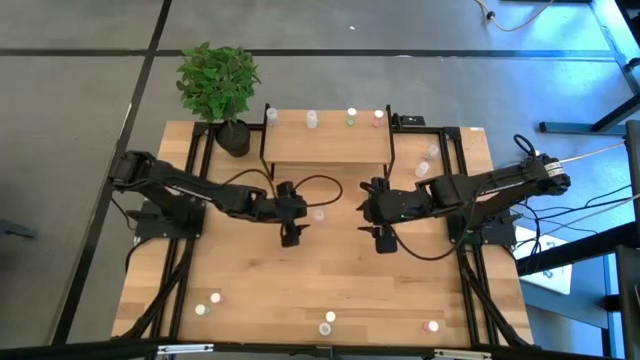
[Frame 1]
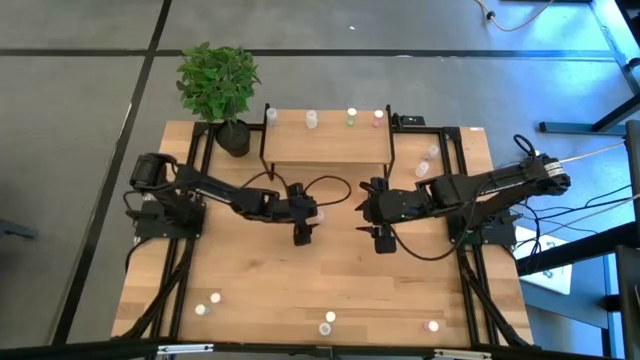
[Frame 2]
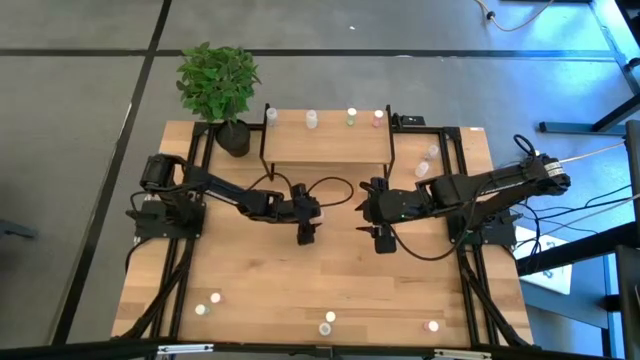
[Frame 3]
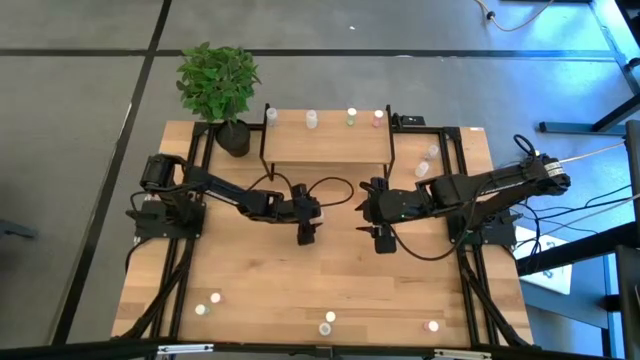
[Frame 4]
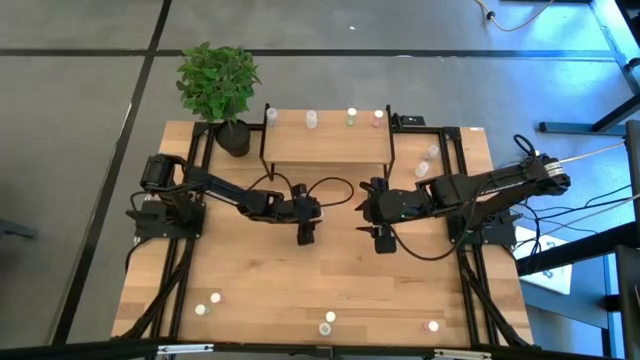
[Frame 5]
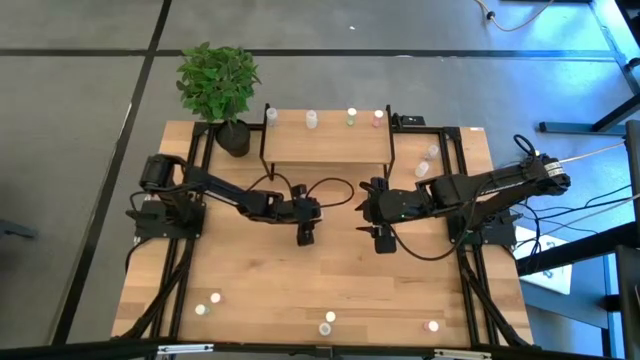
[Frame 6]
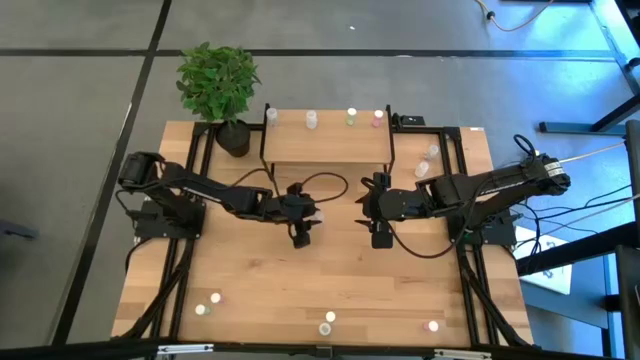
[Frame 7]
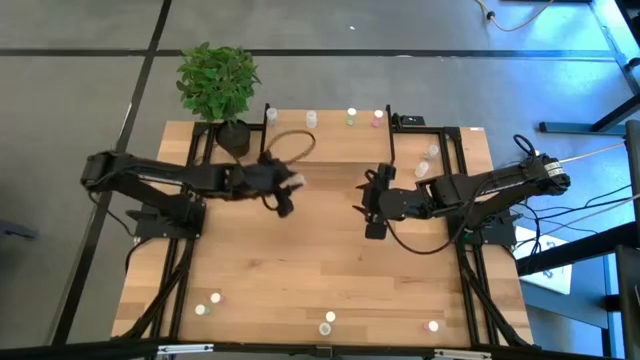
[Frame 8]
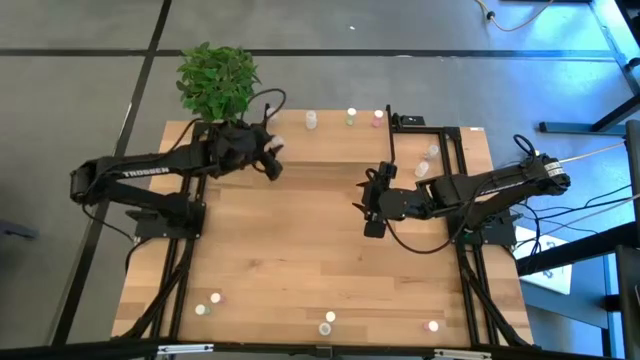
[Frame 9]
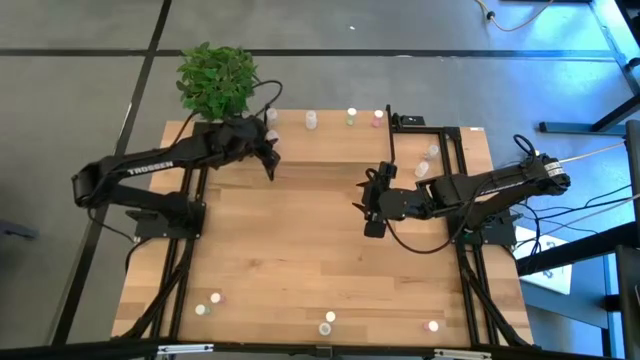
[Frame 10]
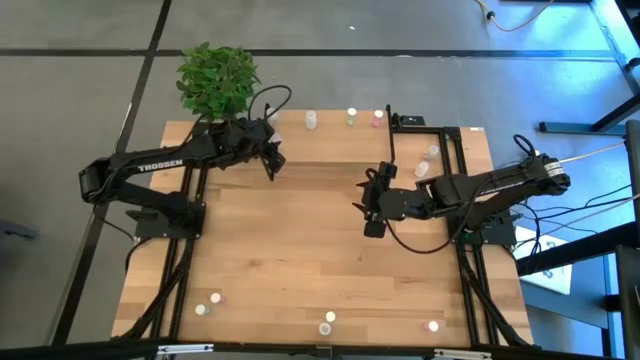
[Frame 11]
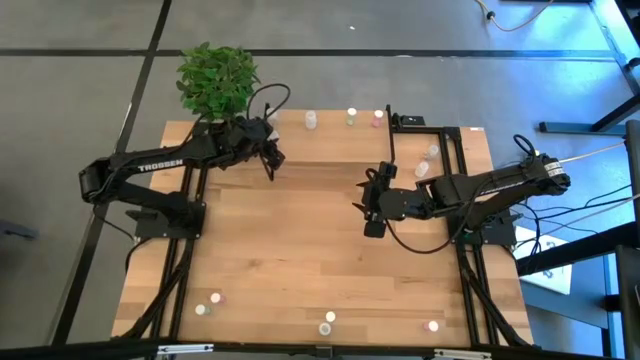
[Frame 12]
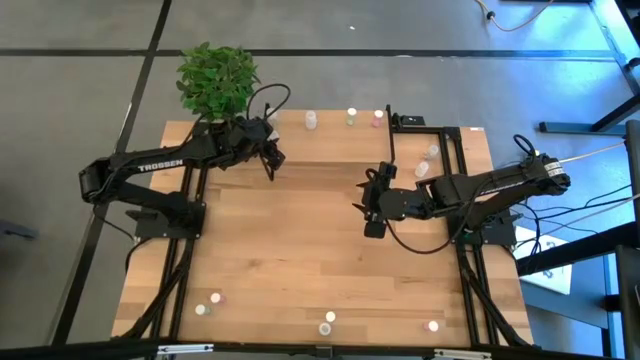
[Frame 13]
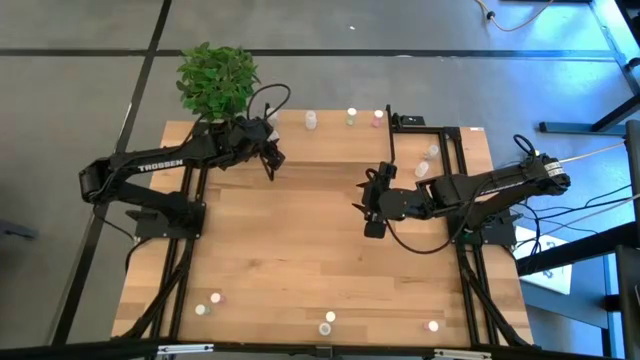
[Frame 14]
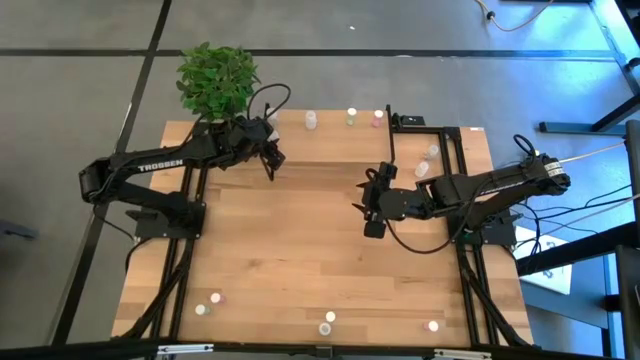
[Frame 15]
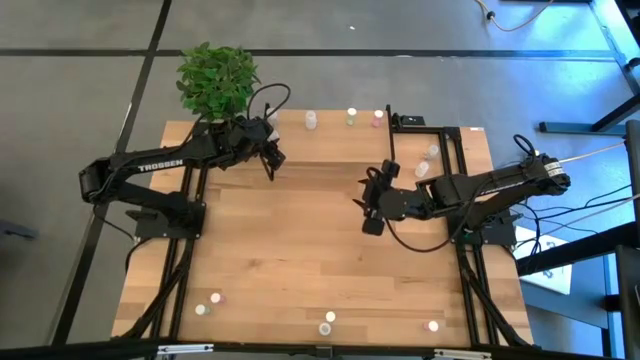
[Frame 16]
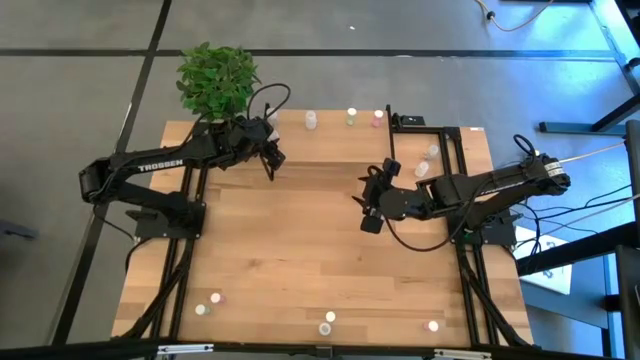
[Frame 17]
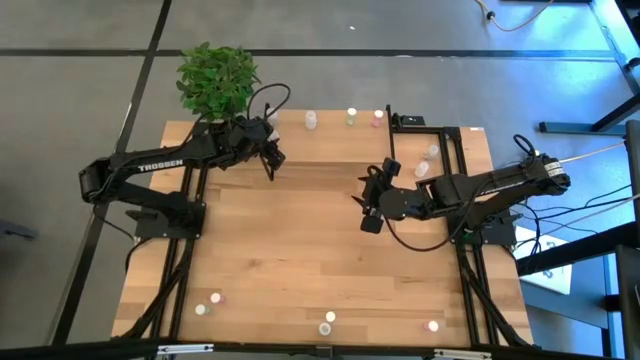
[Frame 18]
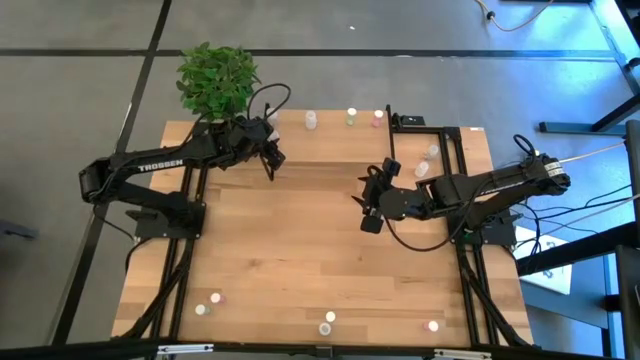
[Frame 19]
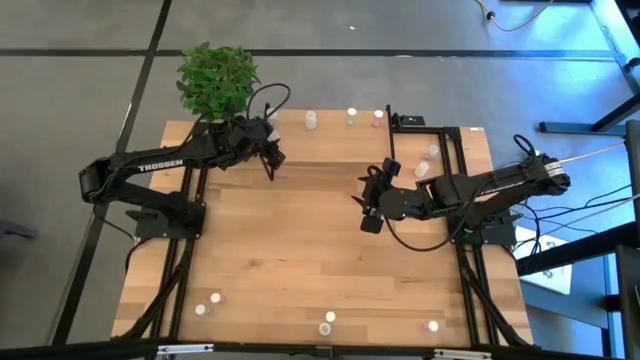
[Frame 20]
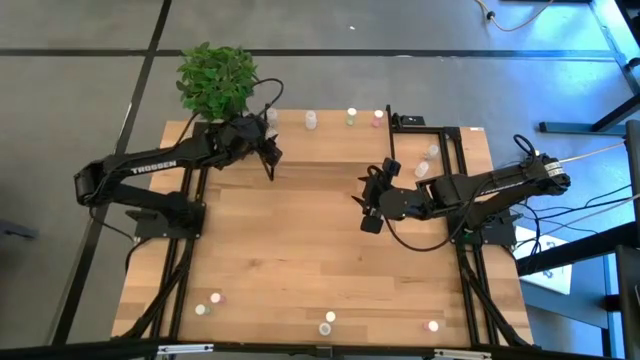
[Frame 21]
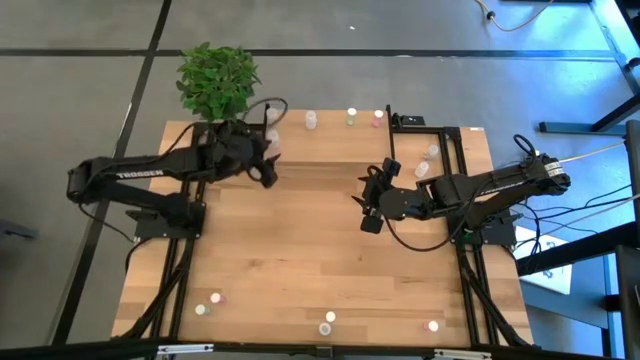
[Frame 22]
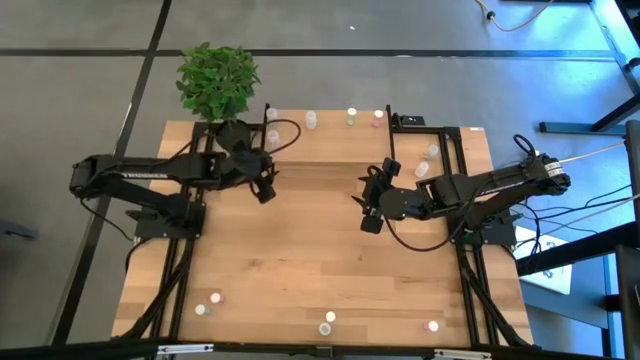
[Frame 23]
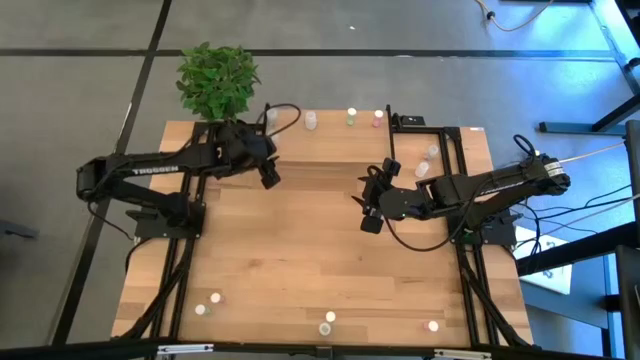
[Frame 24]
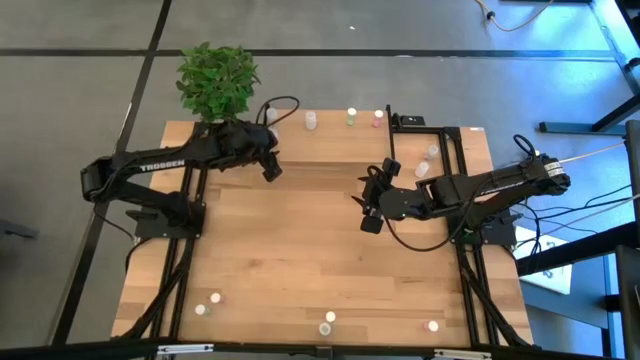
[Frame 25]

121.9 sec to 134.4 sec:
Task: Pick and place medicine bottles onto shelf by color
Put the middle right transparent pill bottle on the shelf aligned with the other transparent pill bottle

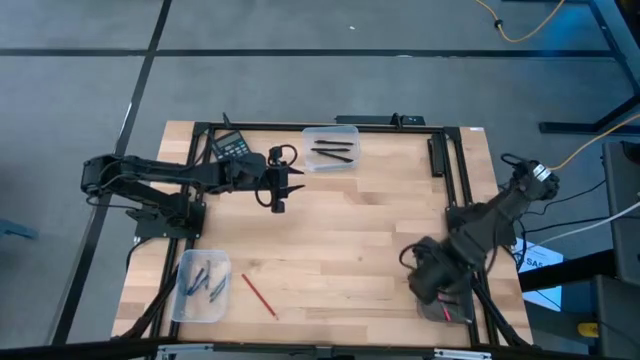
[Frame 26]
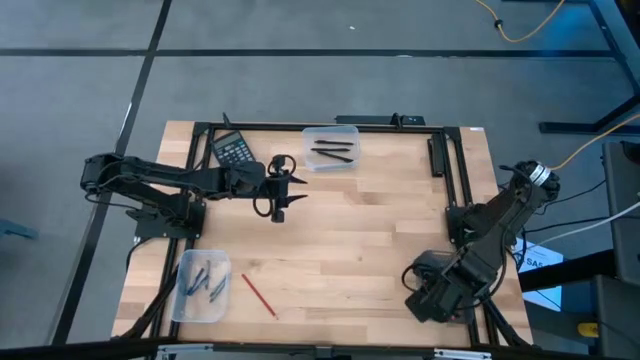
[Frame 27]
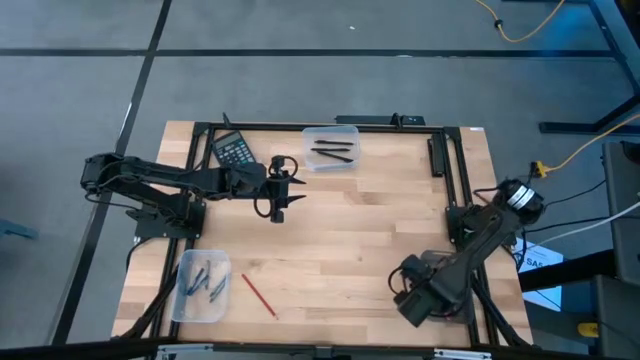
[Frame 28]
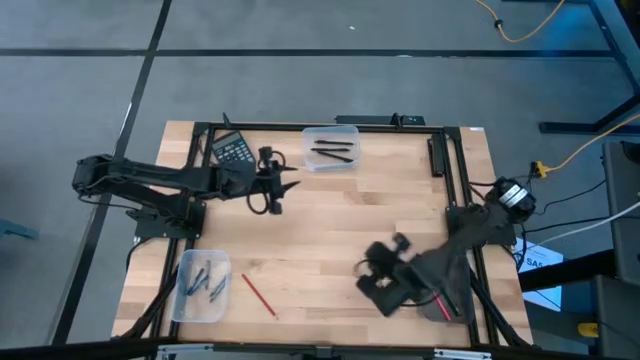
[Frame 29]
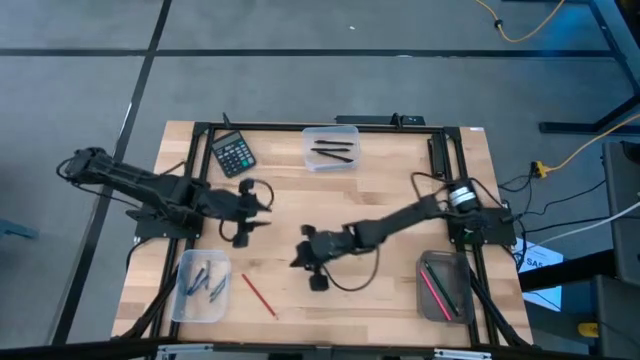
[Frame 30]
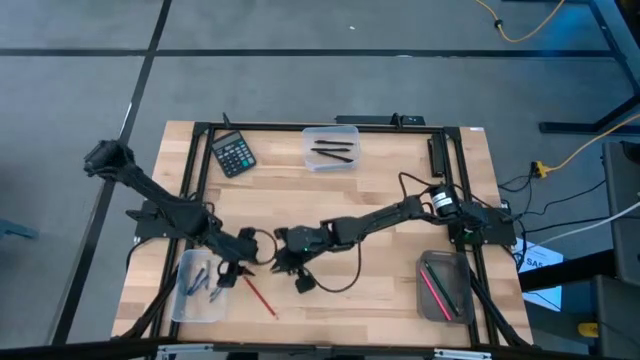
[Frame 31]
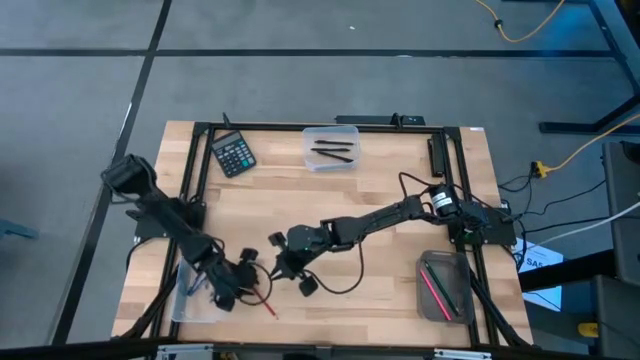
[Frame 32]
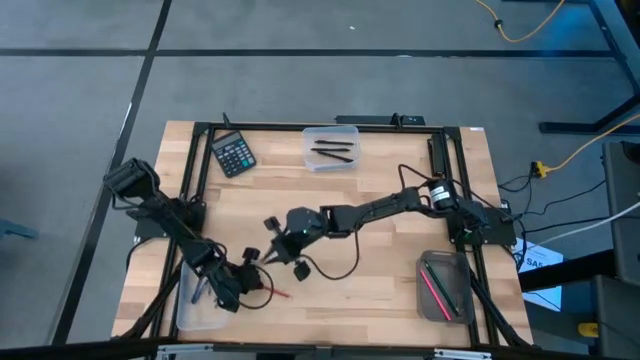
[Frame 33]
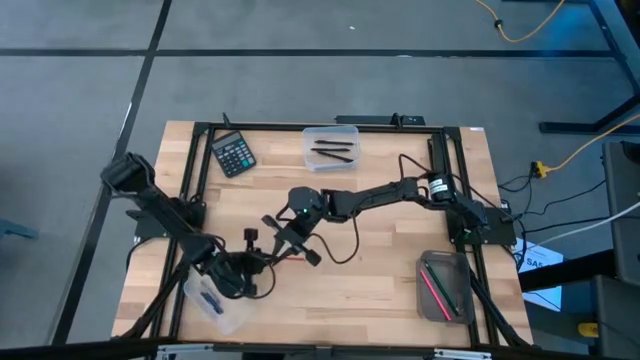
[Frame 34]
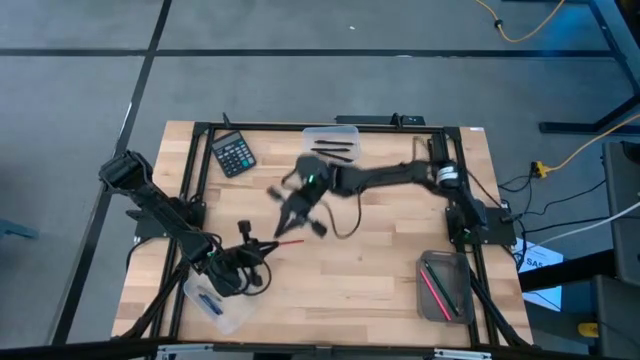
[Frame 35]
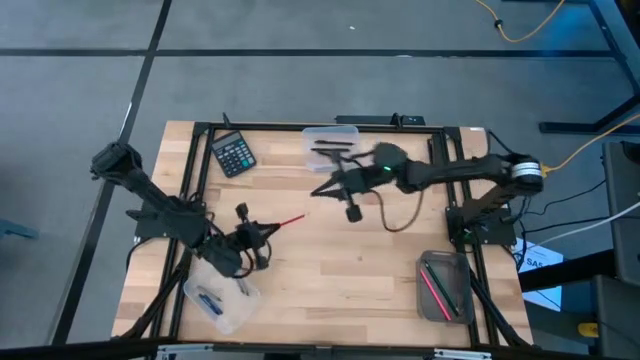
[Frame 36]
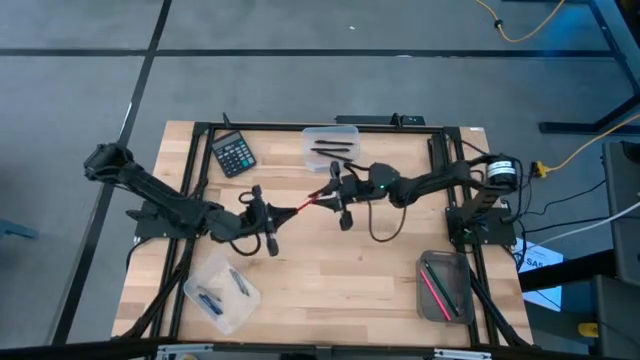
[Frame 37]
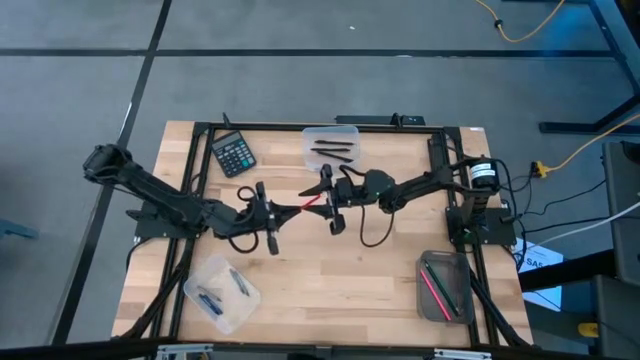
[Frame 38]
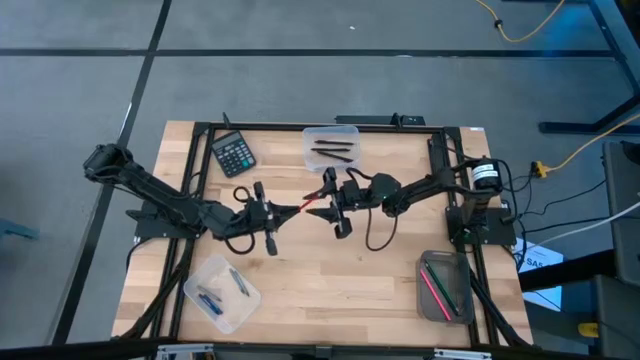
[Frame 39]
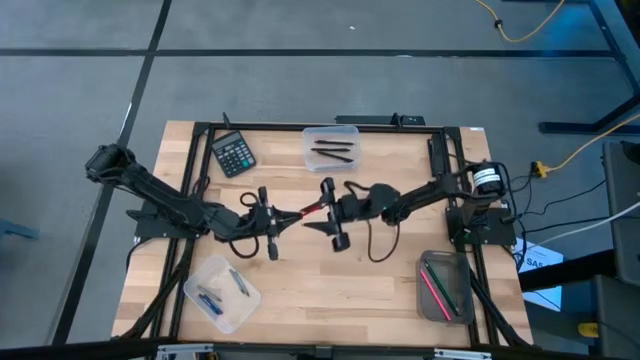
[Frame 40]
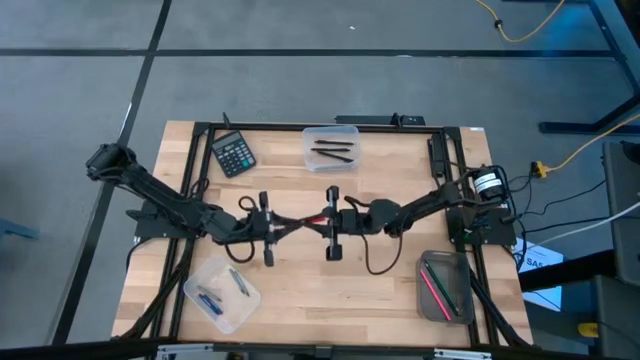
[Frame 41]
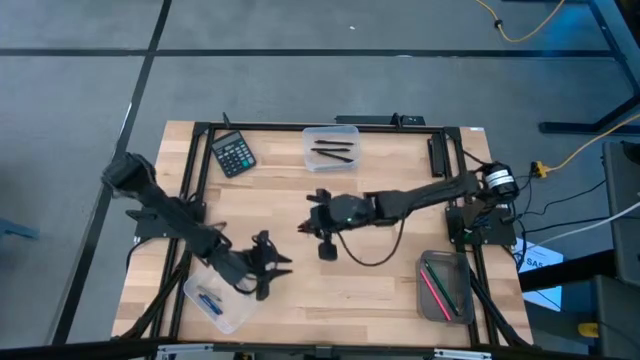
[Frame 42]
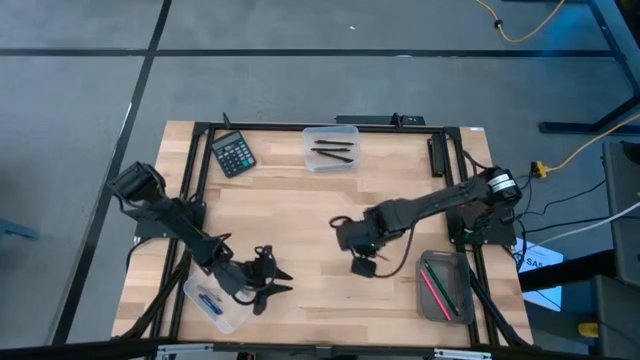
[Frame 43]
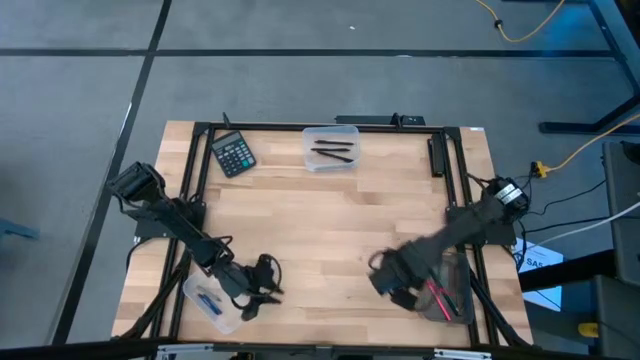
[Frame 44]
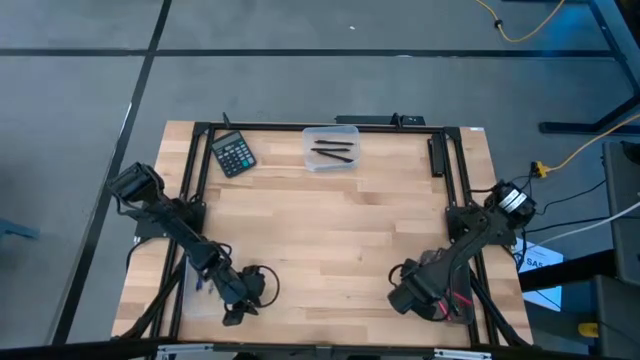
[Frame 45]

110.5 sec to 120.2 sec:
Task: Sort crayons/erasers/pens/pencils in bins
Put the red color pencil into the black bin
